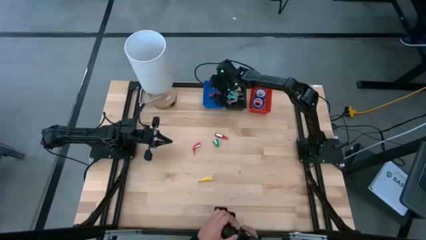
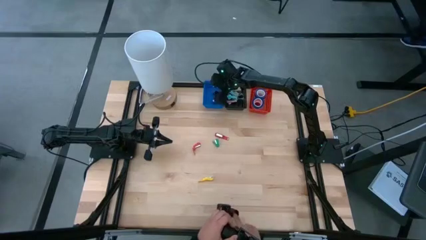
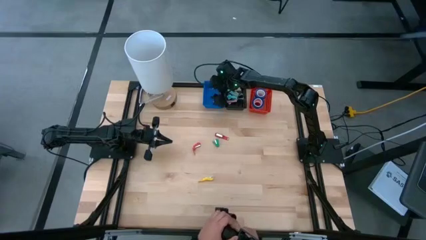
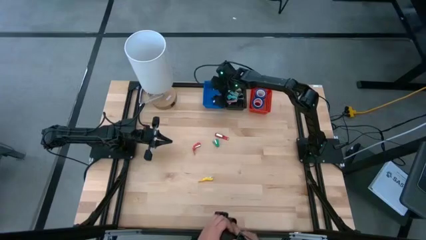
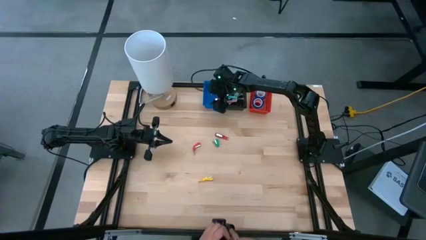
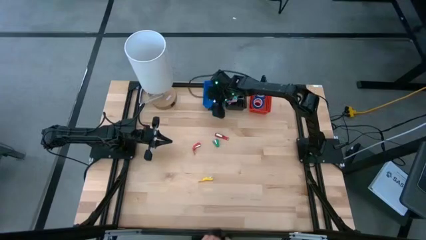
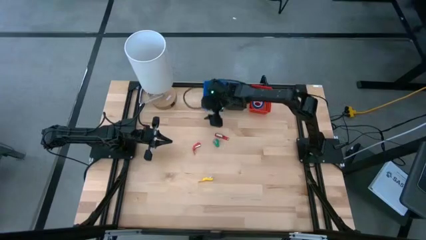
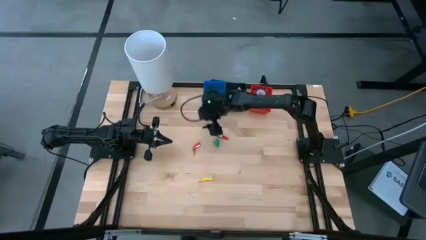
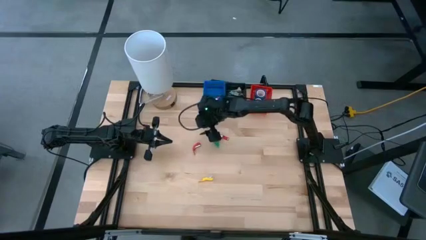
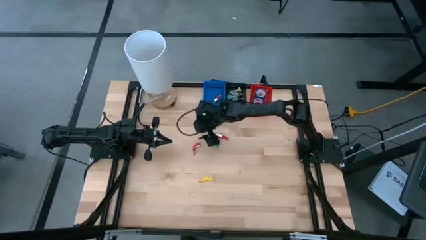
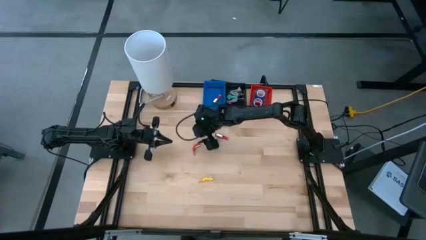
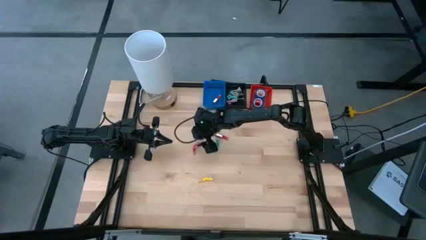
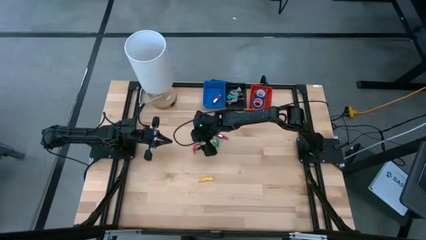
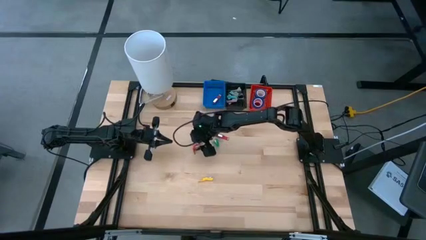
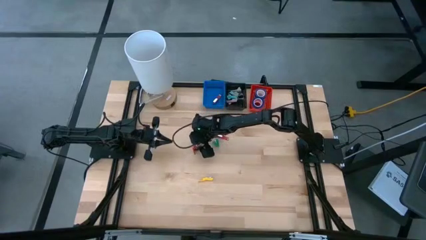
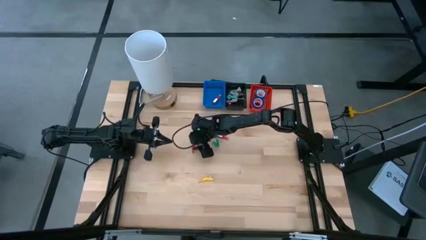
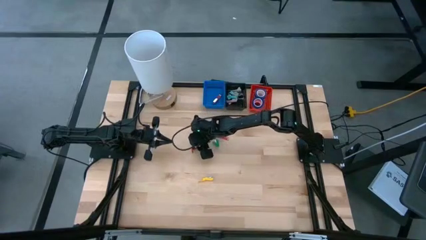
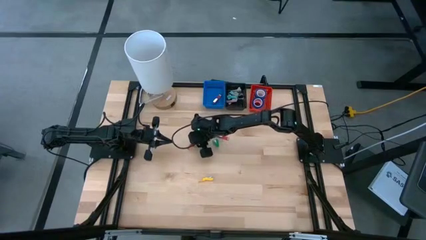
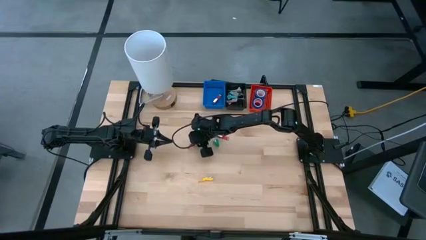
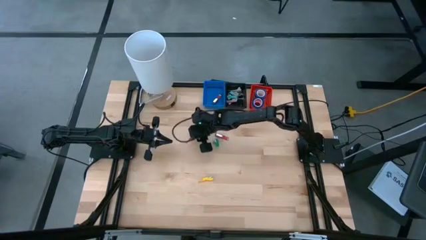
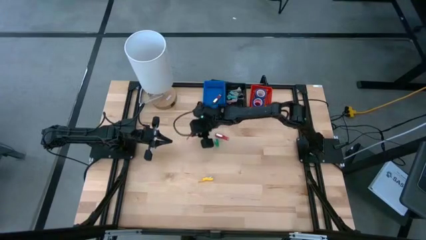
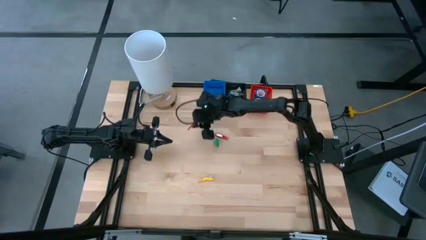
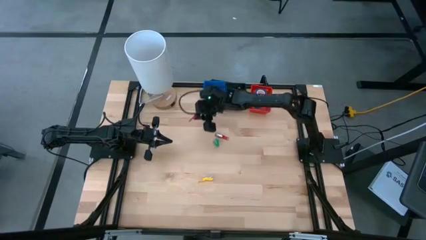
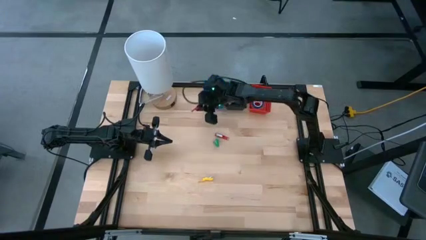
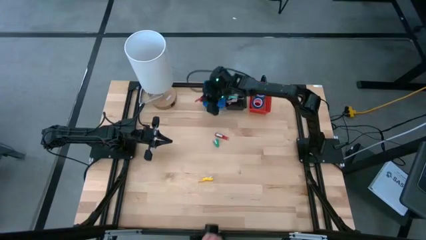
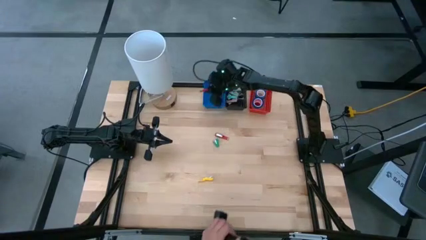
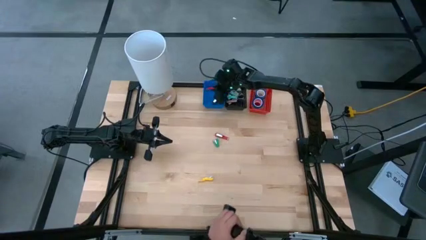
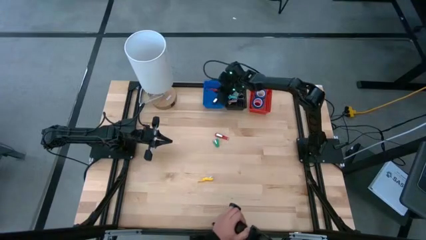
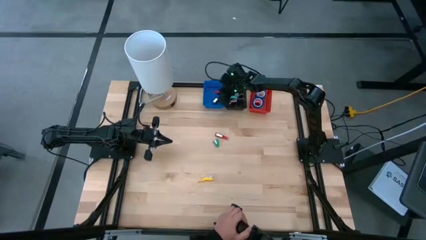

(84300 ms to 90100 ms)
Task: Pick and place Stapler, Stapler remover, tape
Put the left red stapler into the blue bin

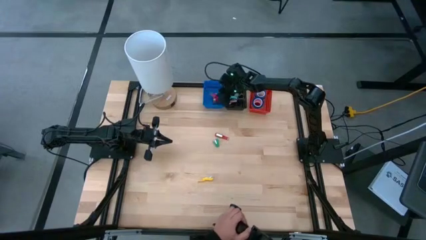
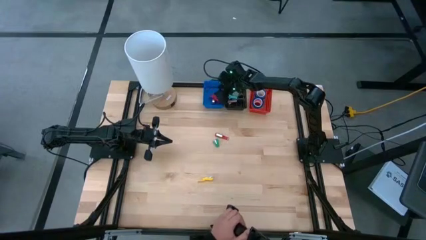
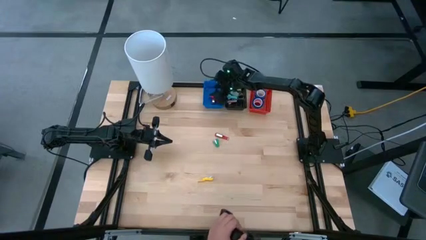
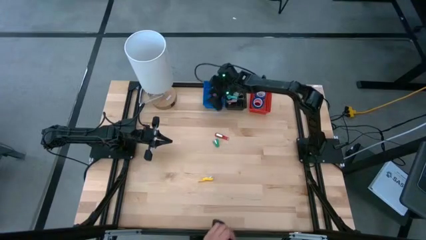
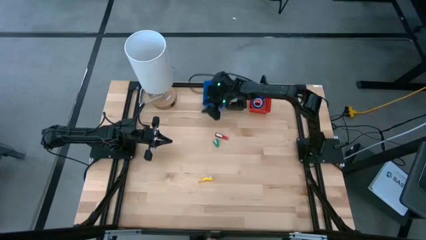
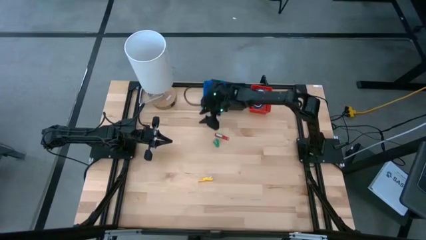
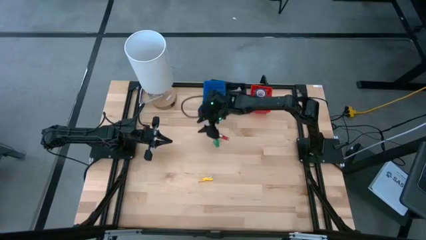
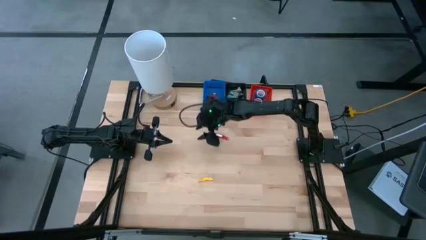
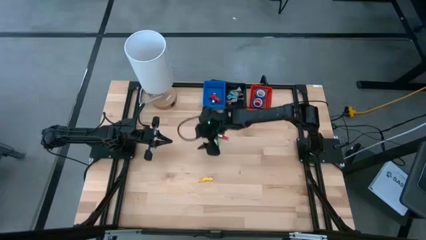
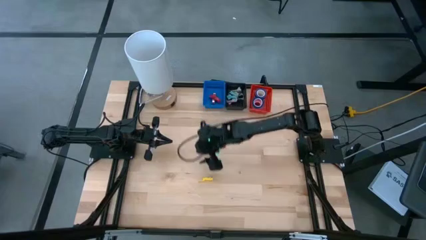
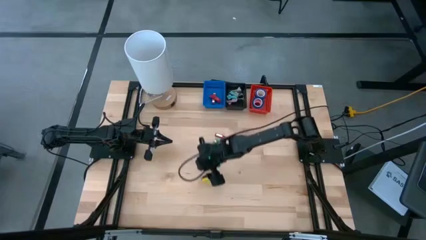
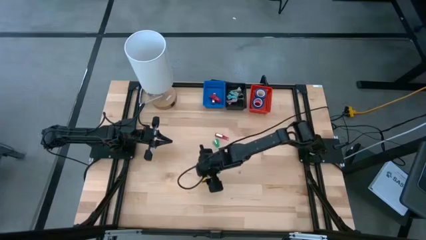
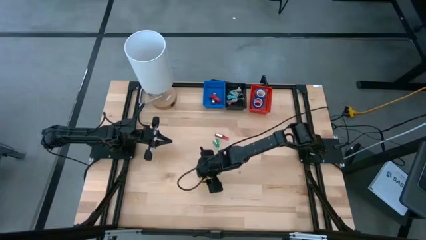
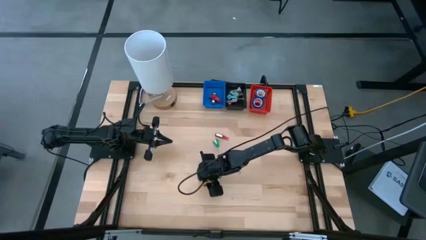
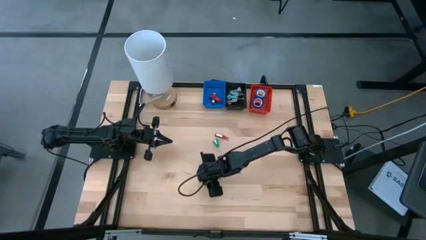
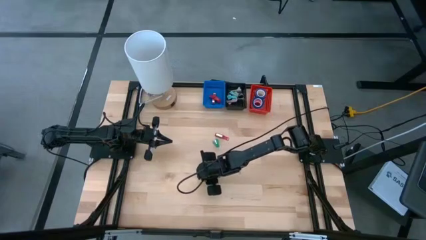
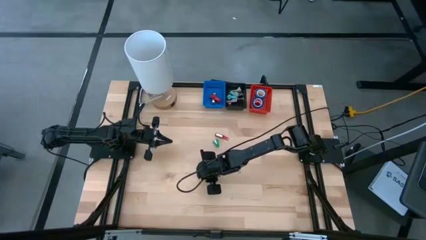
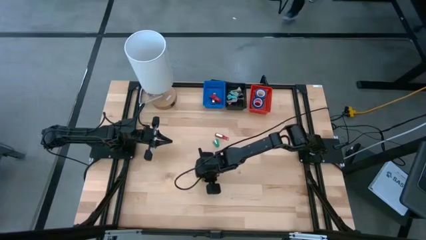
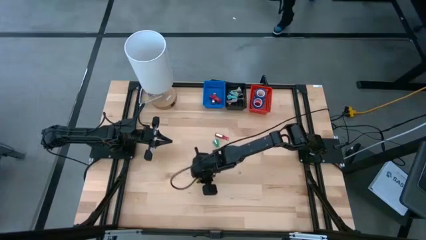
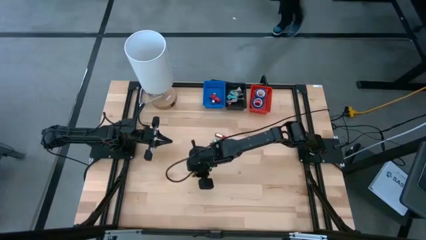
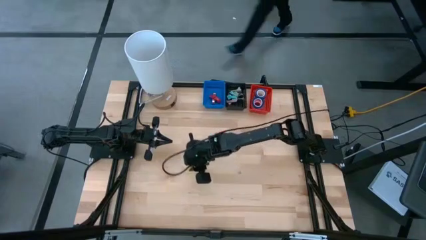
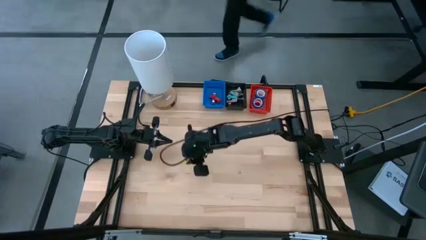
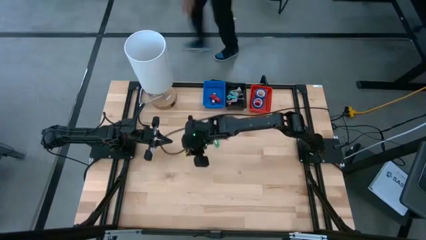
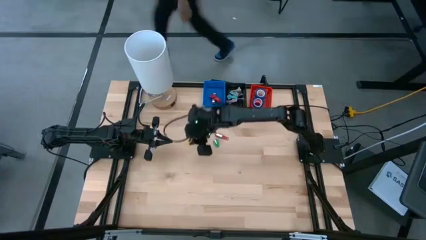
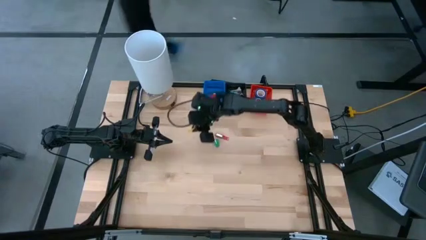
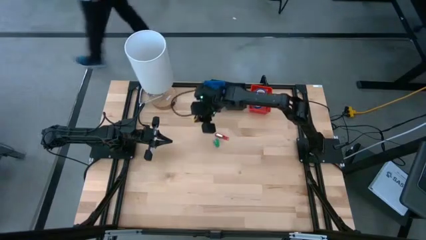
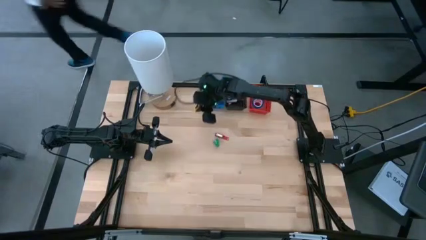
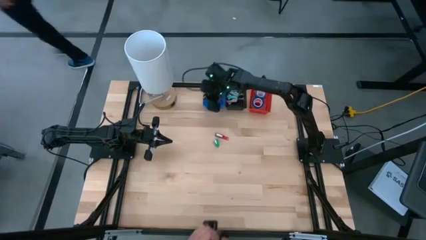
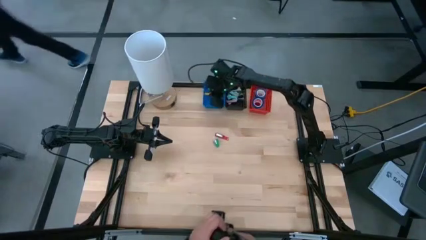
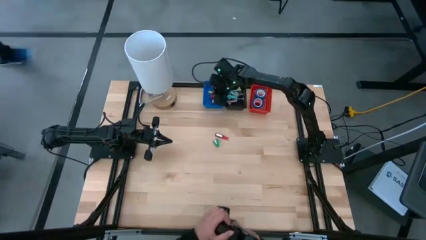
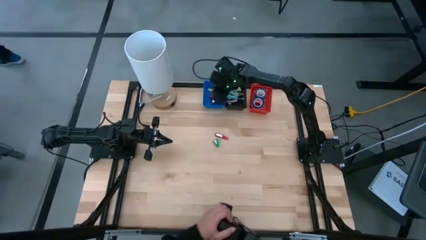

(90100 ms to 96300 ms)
Put the yellow stapler into the blue bin

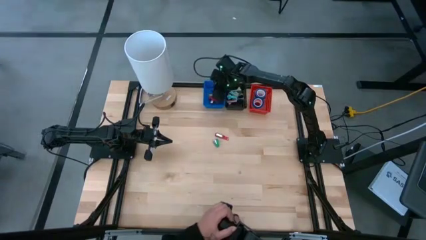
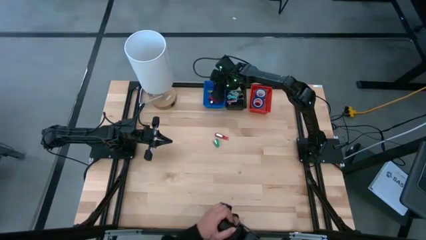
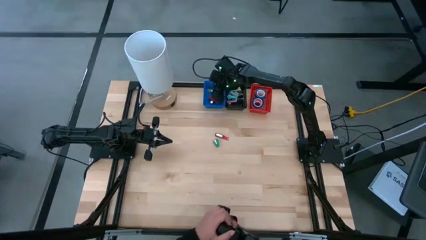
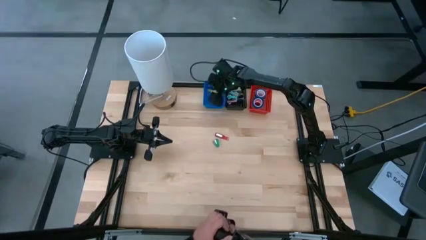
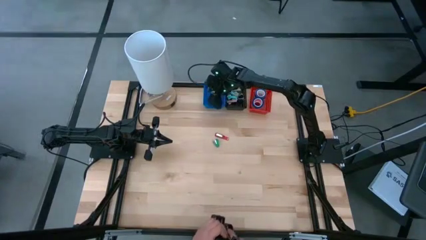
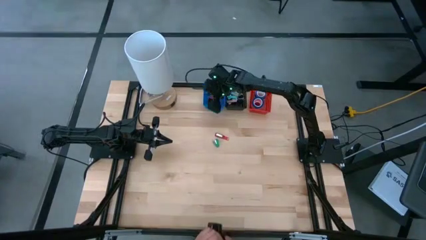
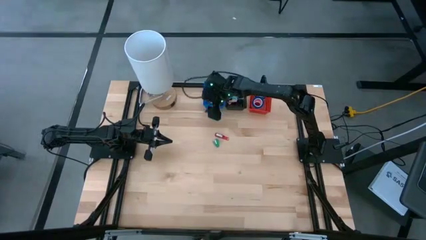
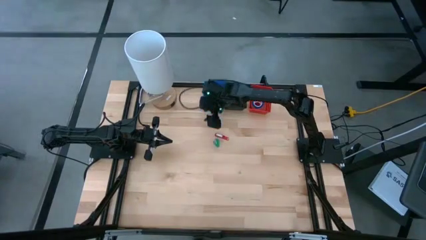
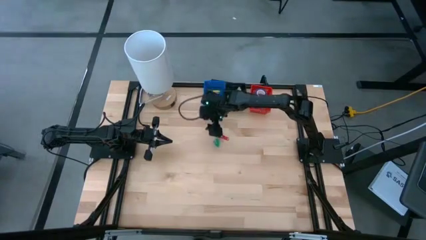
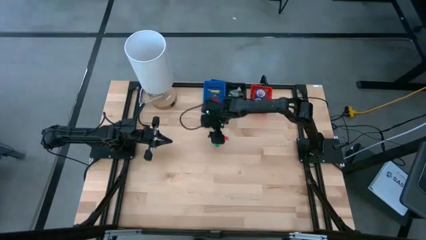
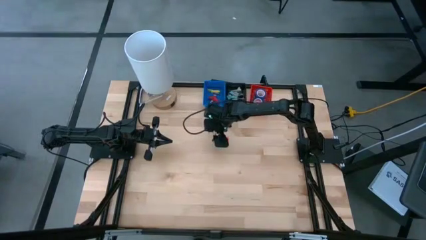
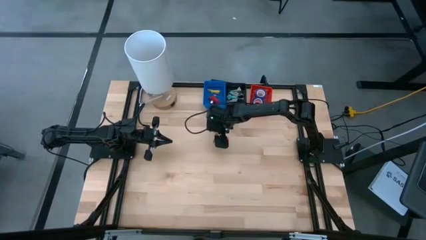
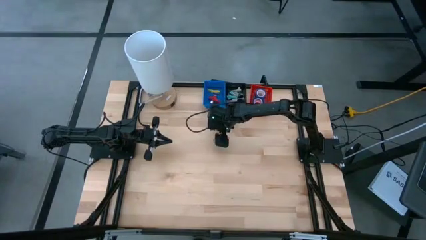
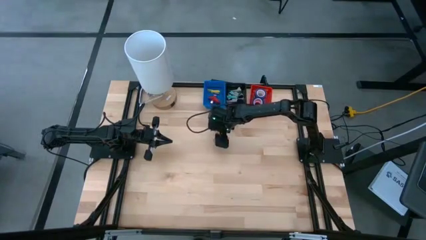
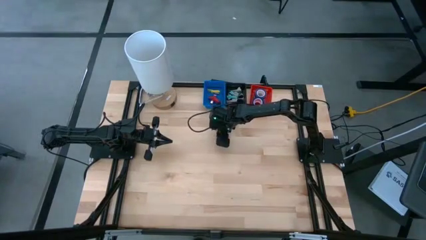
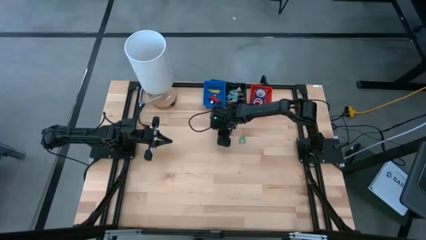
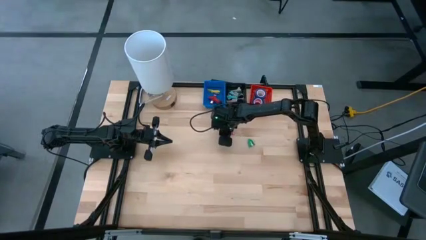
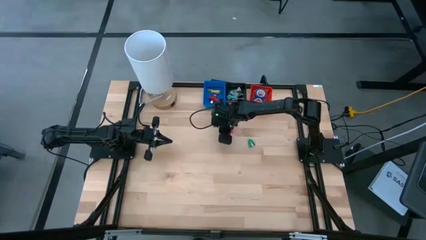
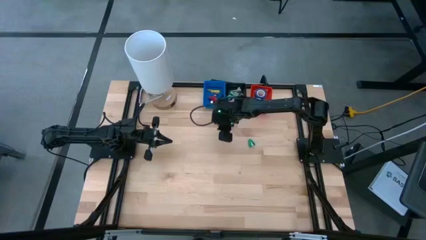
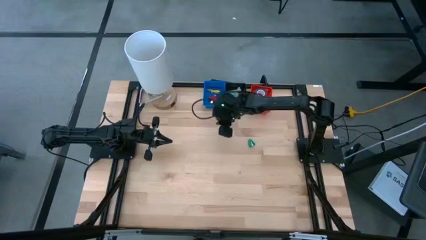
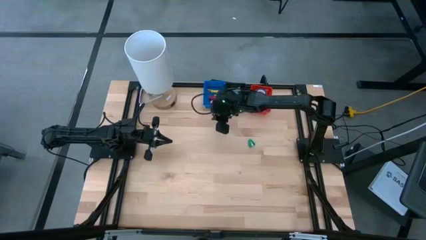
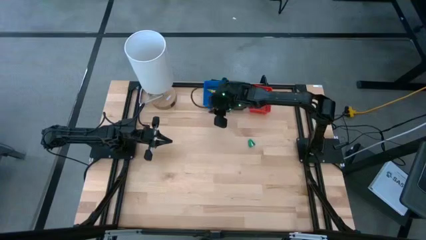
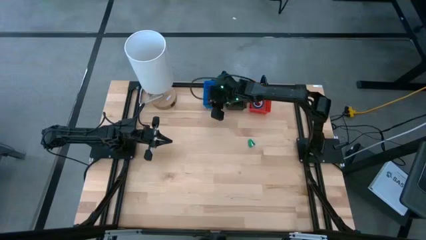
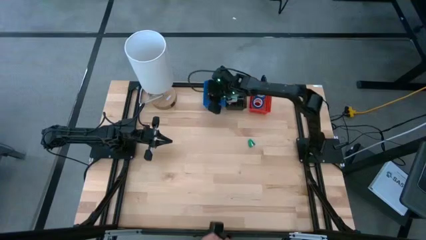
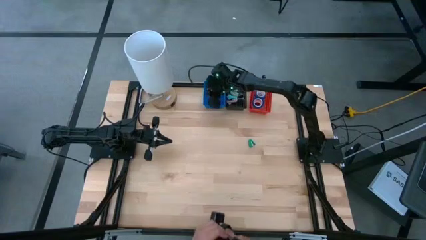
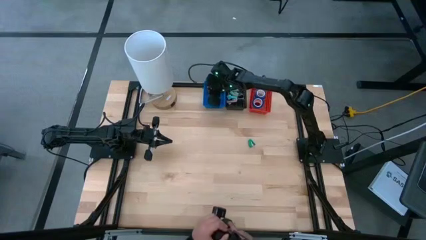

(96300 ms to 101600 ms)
Put the red stapler into the blue bin
